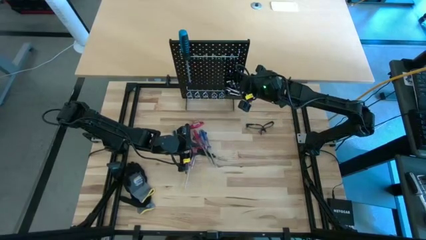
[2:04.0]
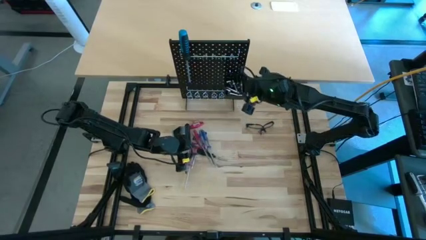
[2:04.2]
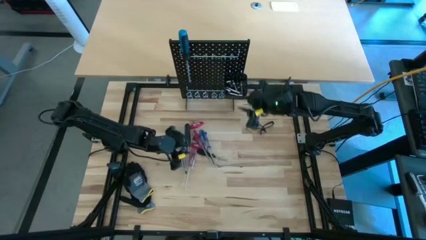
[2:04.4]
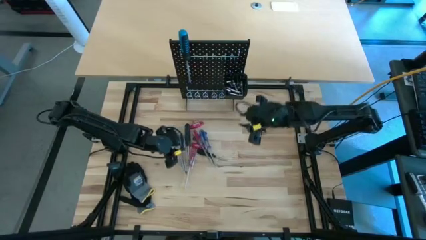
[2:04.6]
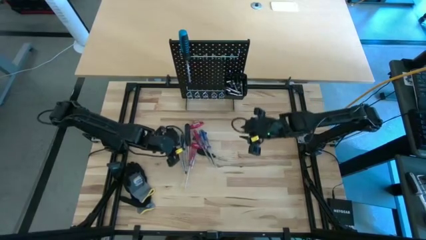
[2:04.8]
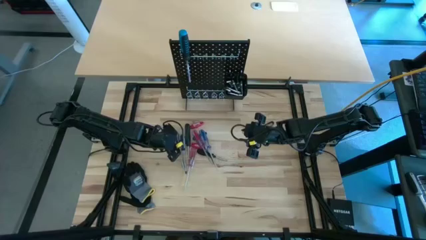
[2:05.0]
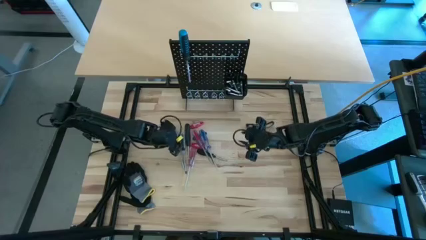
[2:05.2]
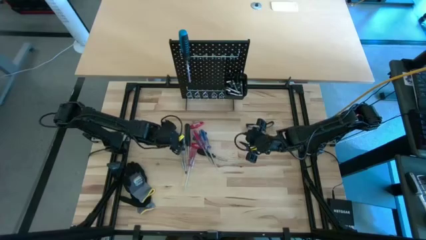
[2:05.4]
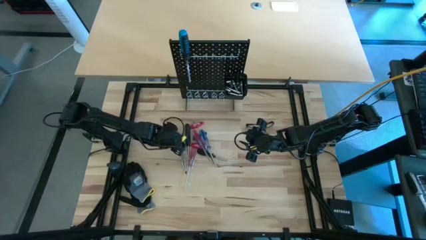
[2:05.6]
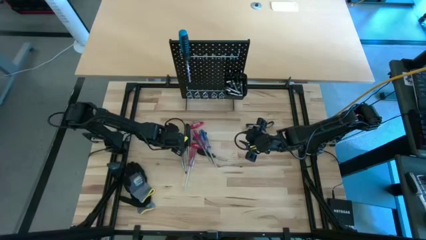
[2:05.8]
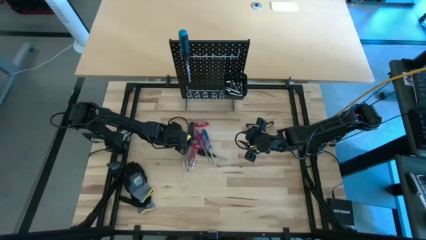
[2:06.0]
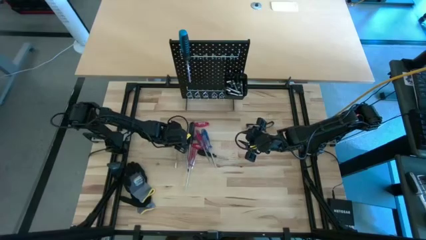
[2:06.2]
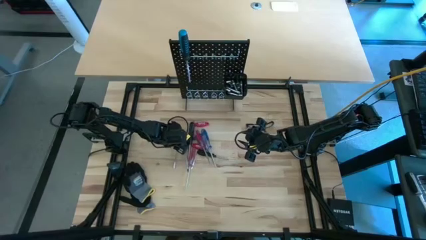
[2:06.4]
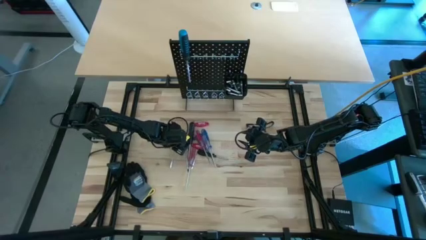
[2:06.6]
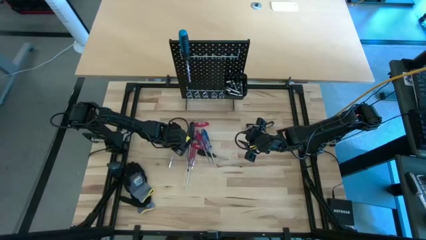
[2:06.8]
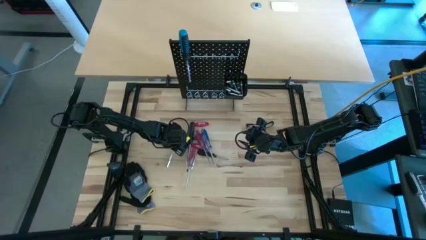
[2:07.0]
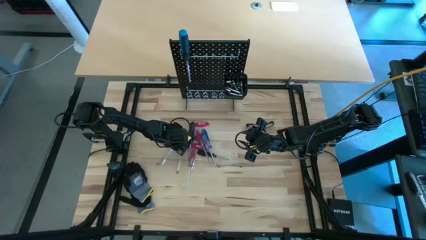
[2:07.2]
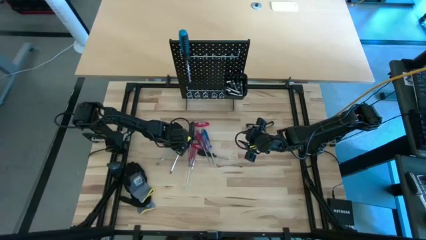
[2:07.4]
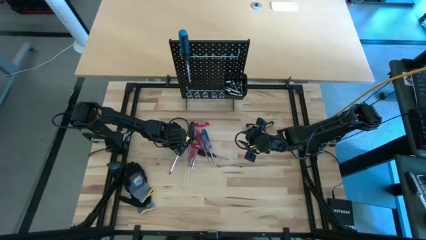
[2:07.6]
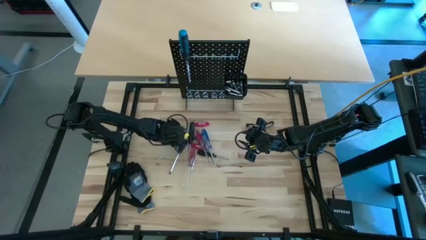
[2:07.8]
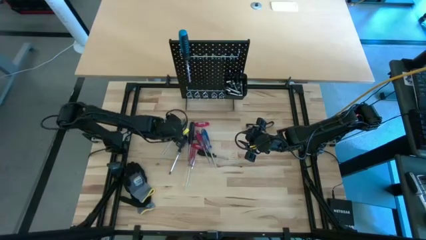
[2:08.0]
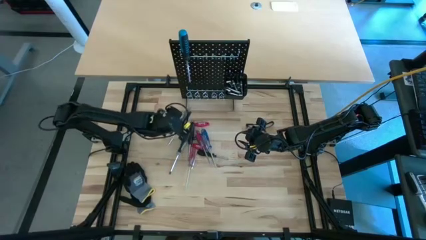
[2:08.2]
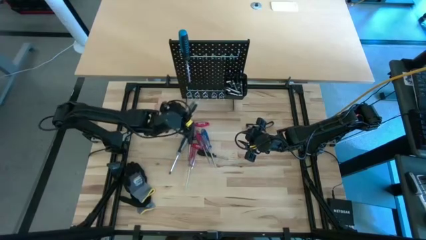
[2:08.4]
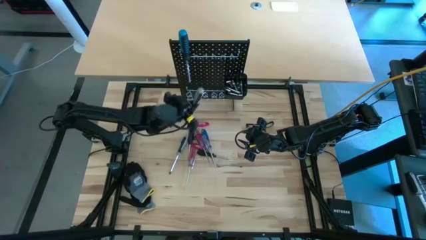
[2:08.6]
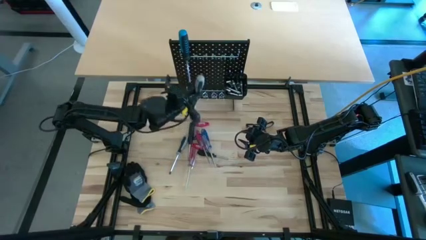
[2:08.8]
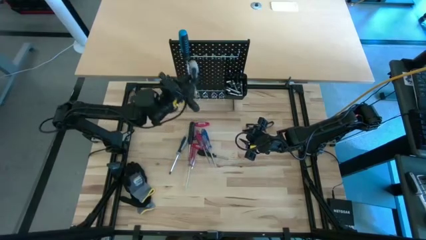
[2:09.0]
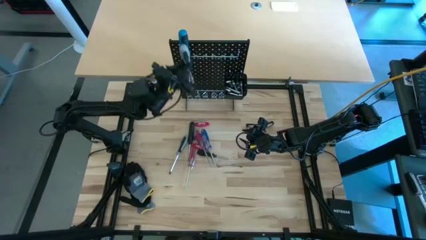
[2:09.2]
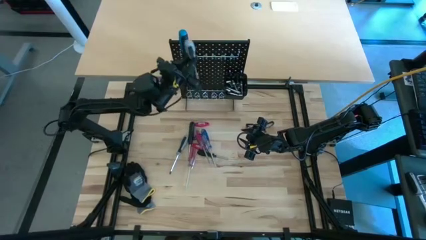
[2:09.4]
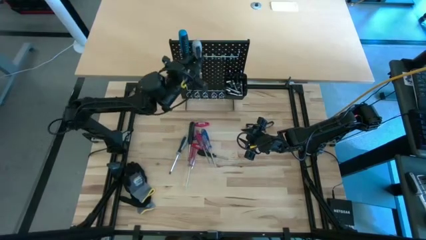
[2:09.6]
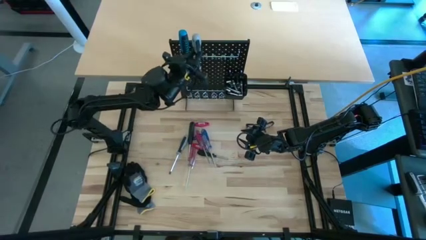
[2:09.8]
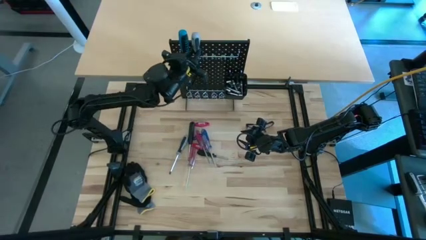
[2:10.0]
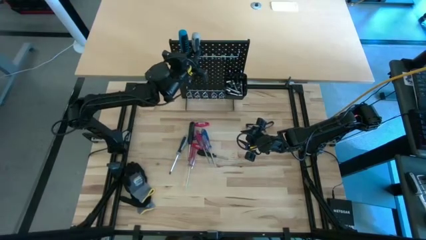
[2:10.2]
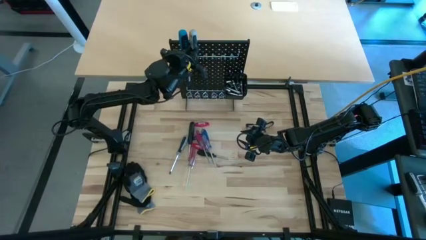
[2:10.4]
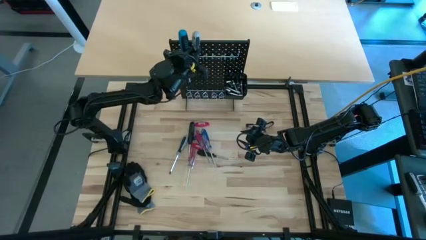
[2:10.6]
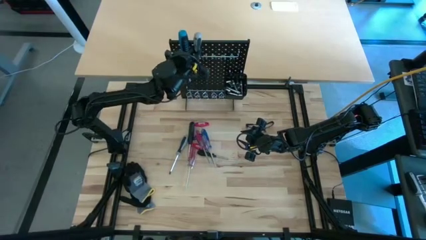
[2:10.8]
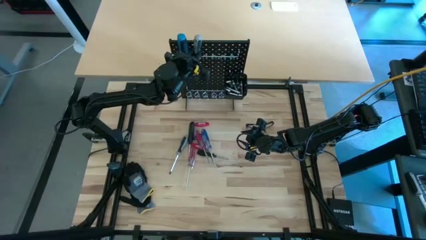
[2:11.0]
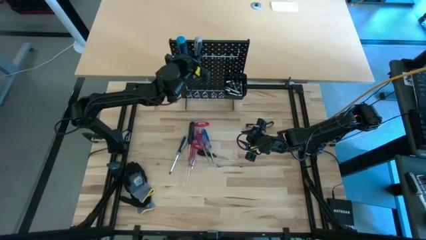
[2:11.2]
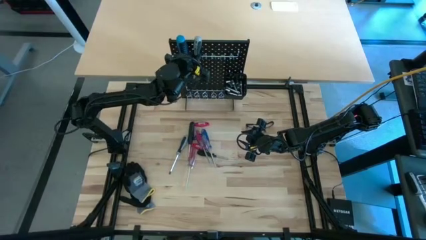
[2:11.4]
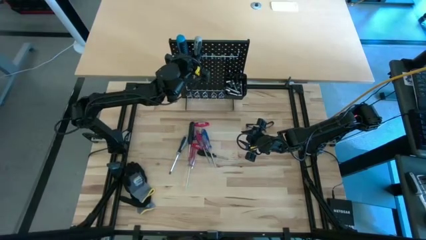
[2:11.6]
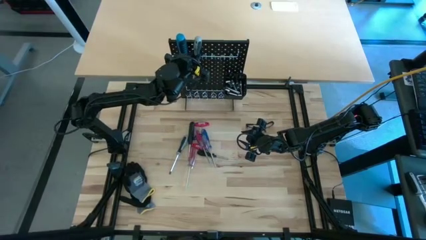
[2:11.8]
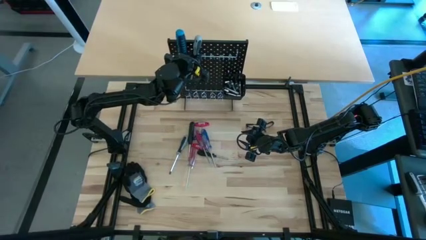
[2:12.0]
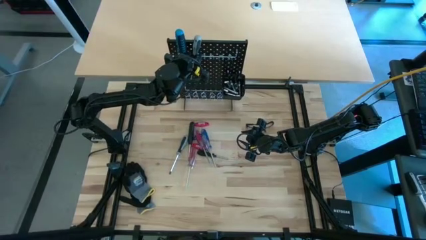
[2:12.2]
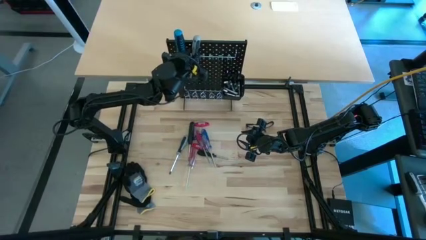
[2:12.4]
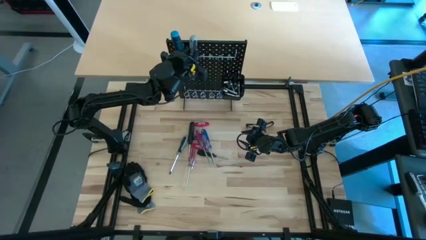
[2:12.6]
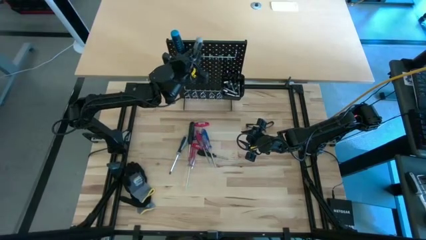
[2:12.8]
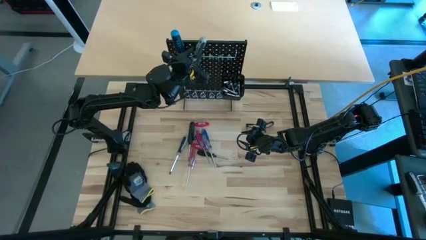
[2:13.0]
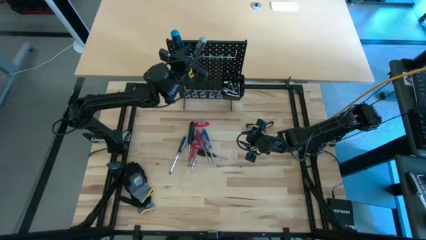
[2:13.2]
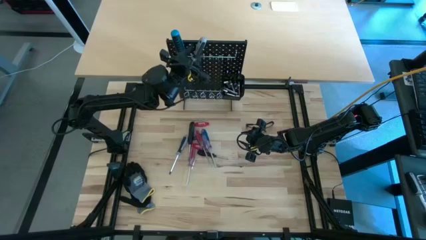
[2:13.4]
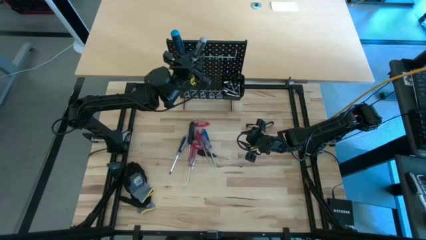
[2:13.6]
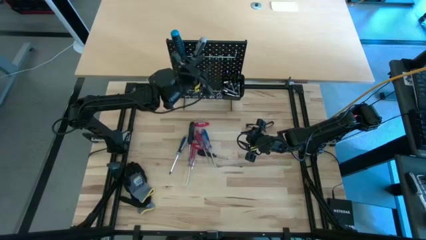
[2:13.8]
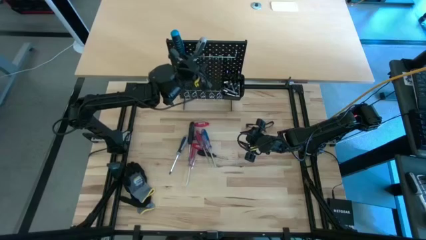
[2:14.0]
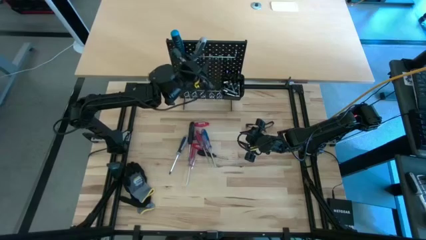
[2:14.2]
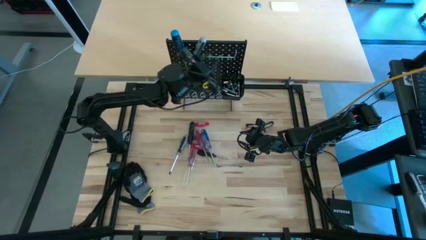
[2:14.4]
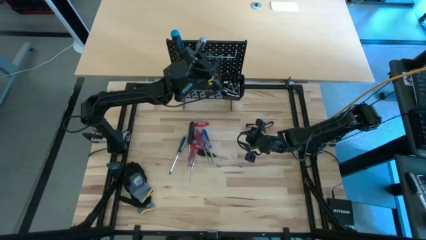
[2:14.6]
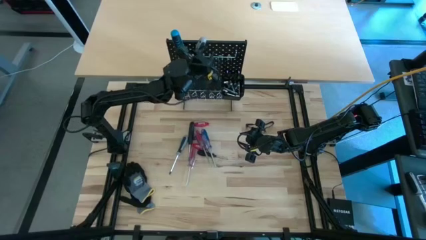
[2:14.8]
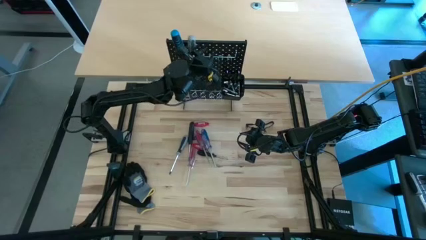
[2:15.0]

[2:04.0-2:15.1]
Task: Hang tools onto peg board
Hang the gray screwdriver on the peg board
